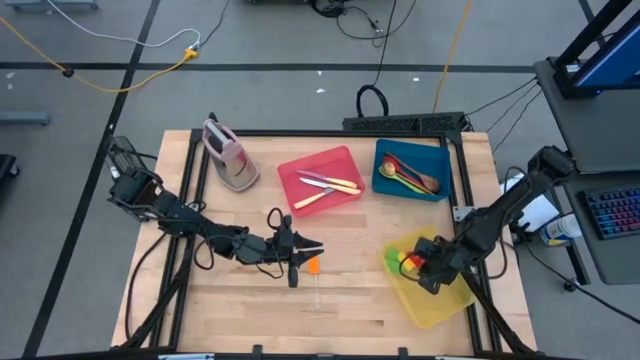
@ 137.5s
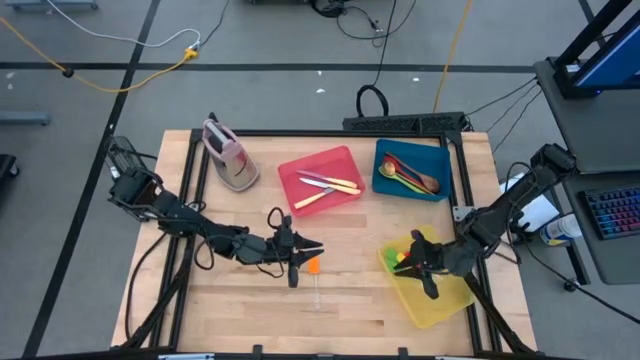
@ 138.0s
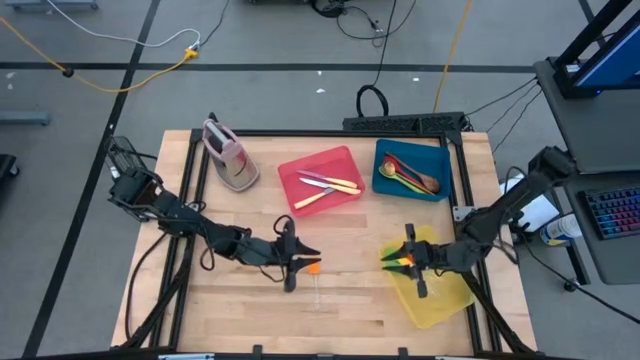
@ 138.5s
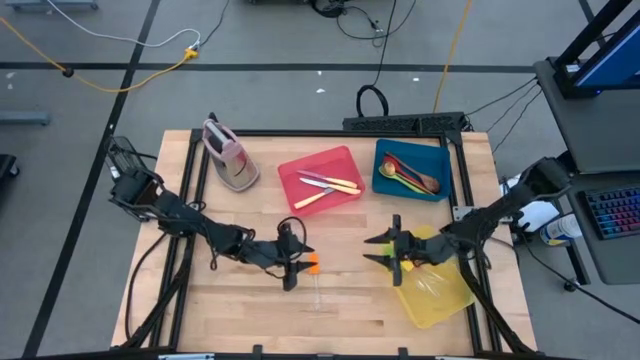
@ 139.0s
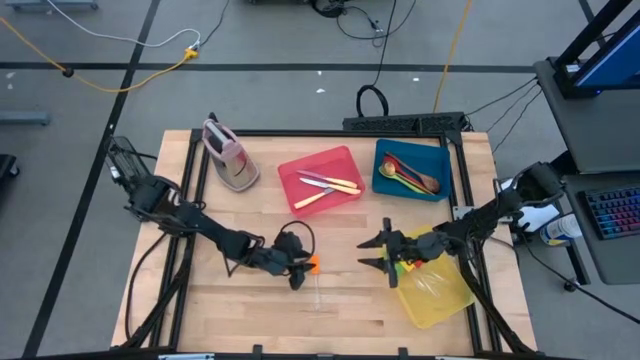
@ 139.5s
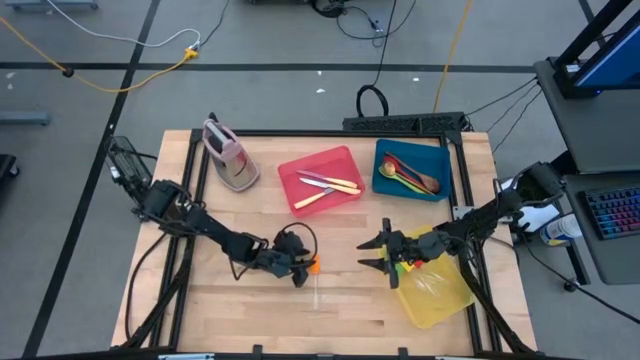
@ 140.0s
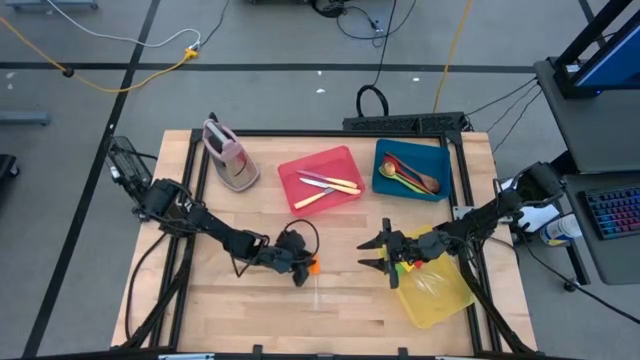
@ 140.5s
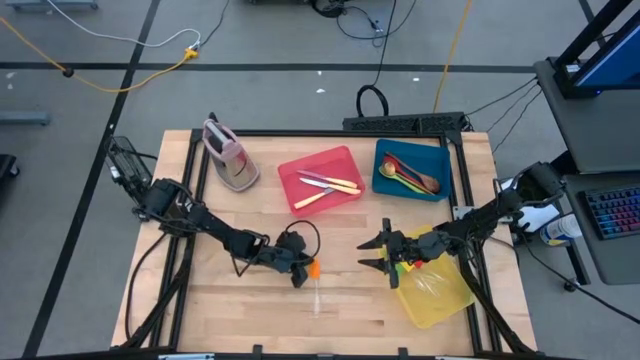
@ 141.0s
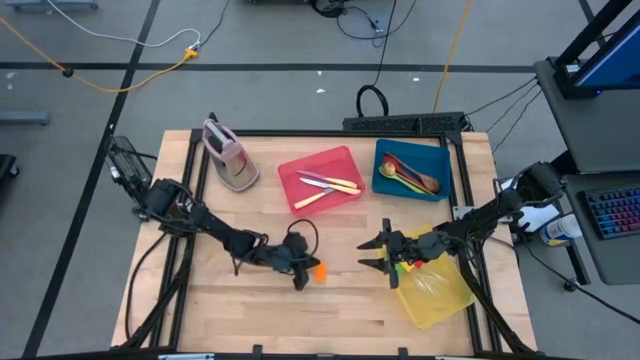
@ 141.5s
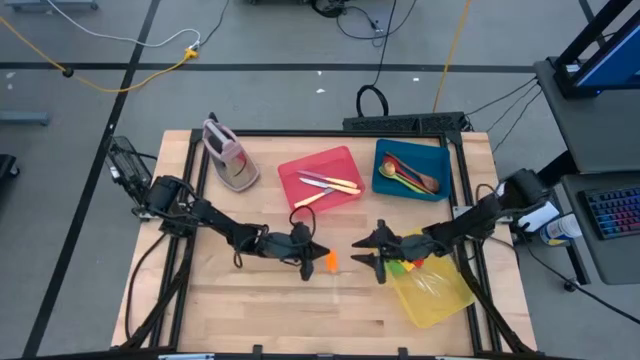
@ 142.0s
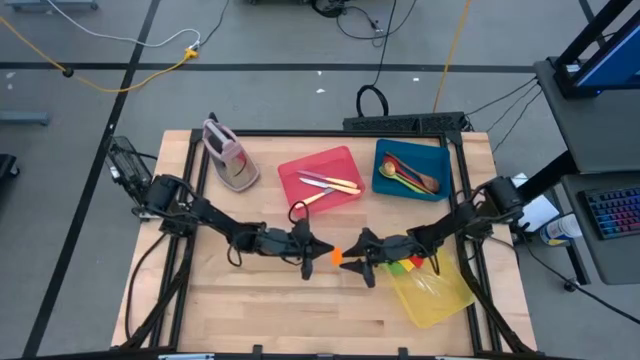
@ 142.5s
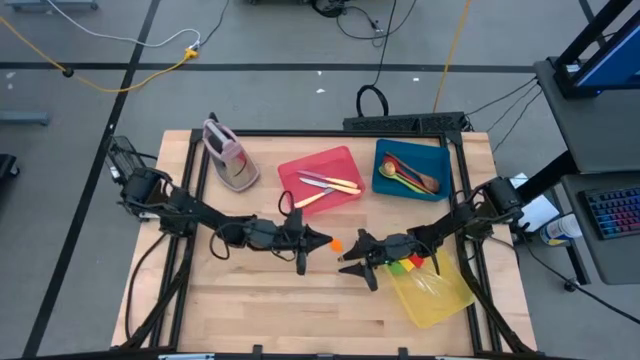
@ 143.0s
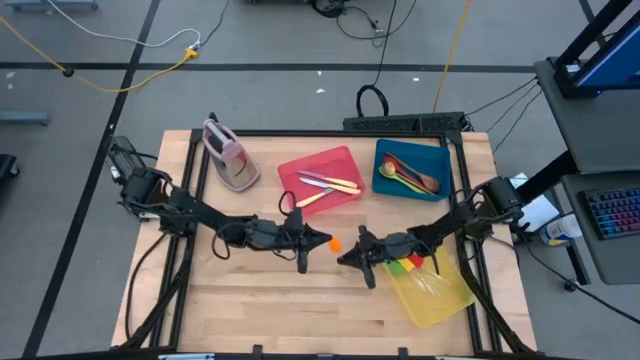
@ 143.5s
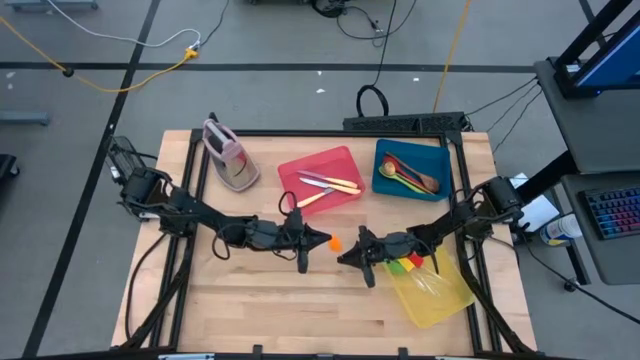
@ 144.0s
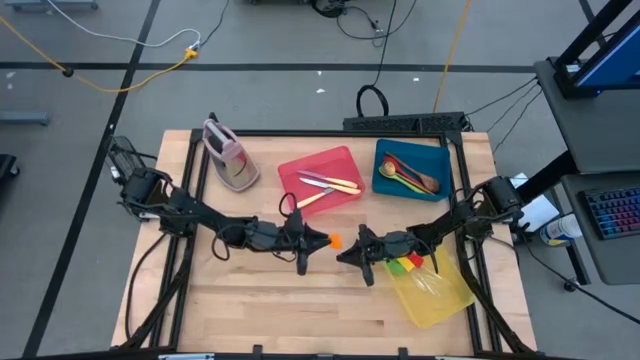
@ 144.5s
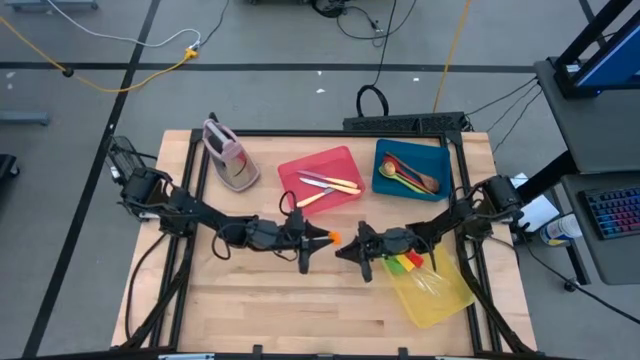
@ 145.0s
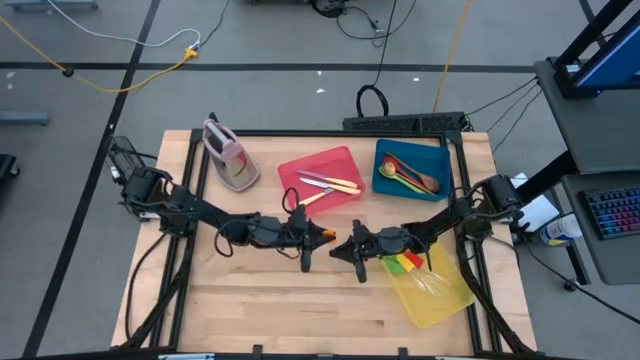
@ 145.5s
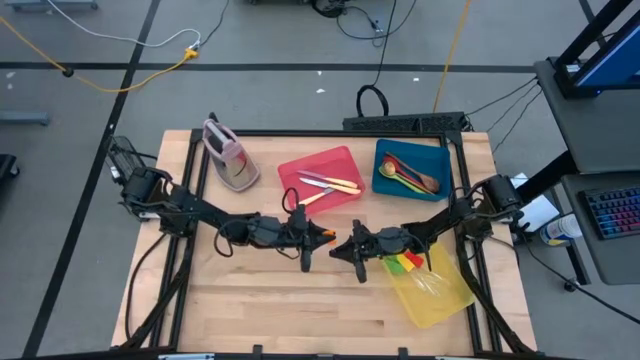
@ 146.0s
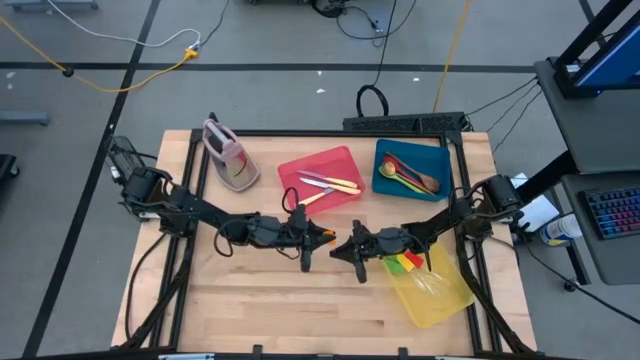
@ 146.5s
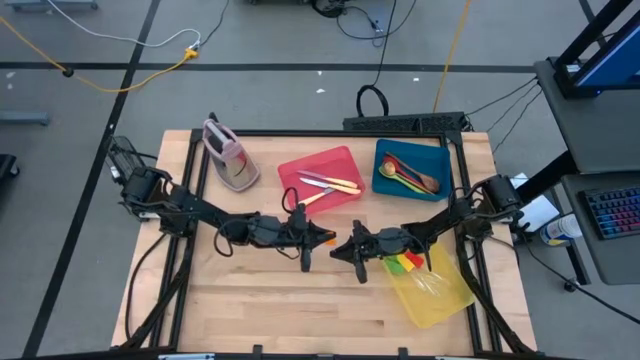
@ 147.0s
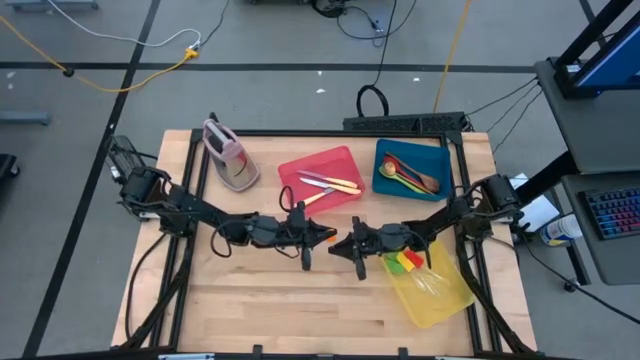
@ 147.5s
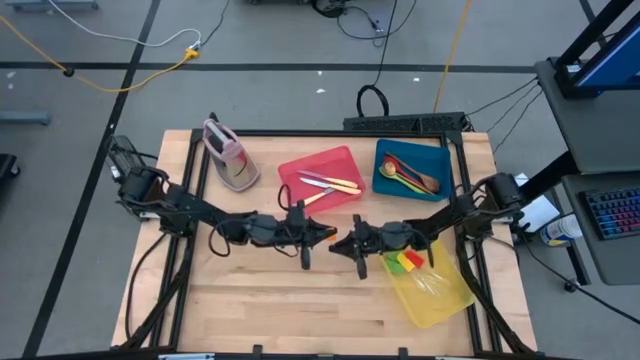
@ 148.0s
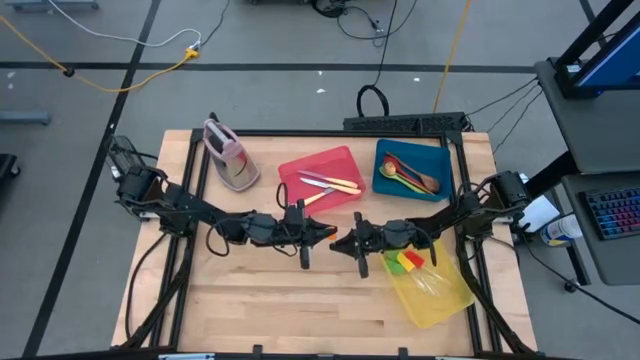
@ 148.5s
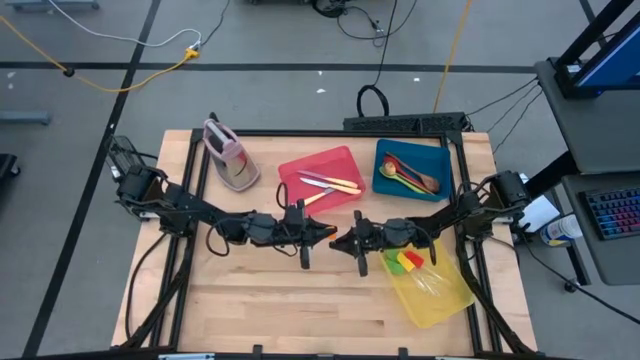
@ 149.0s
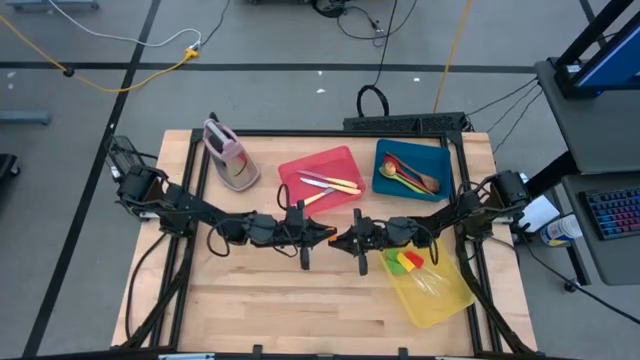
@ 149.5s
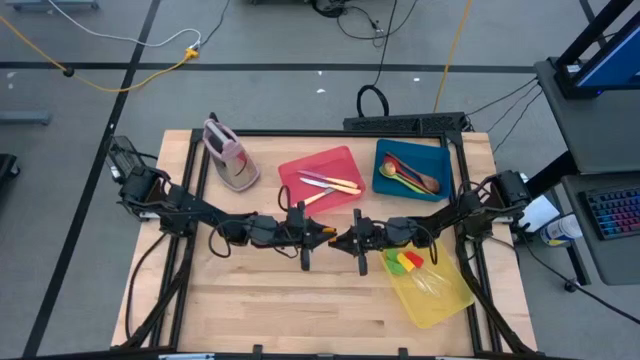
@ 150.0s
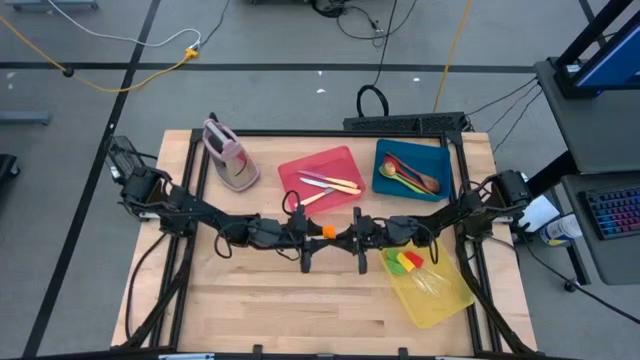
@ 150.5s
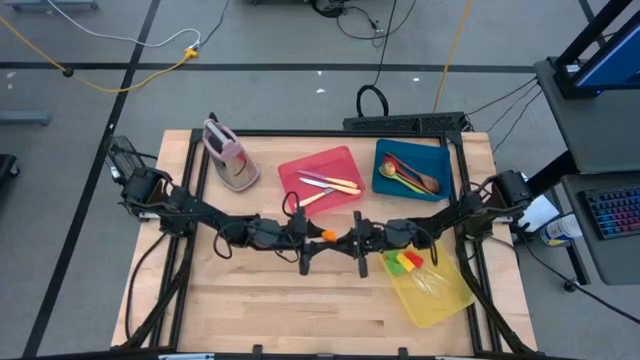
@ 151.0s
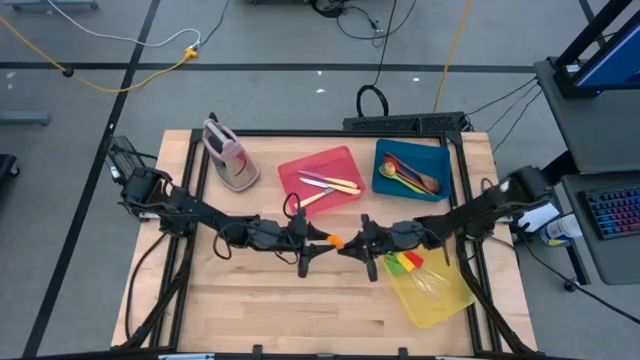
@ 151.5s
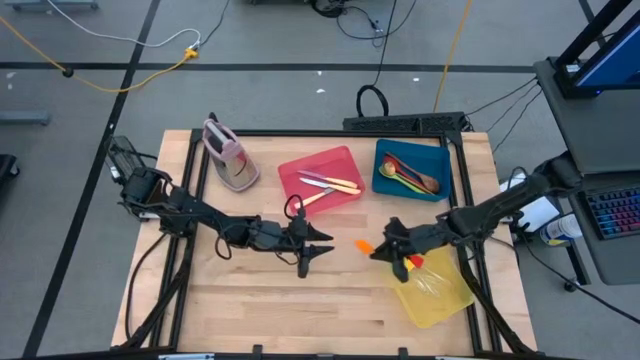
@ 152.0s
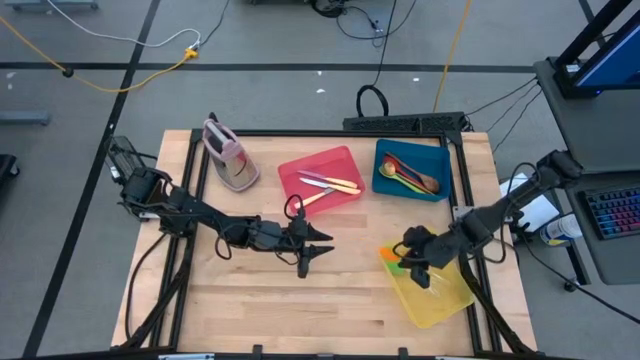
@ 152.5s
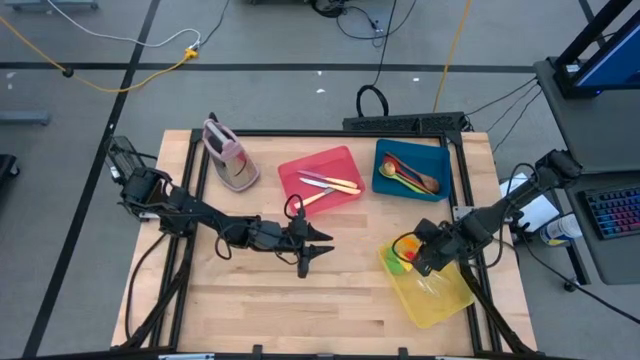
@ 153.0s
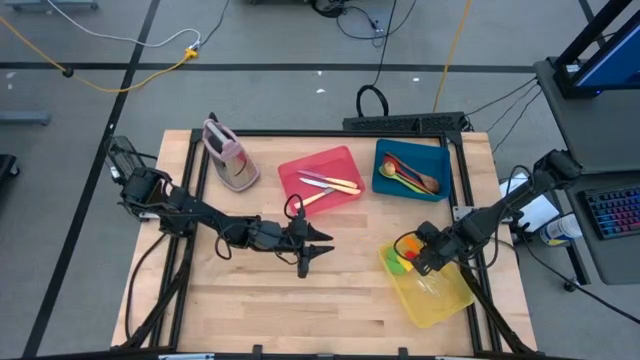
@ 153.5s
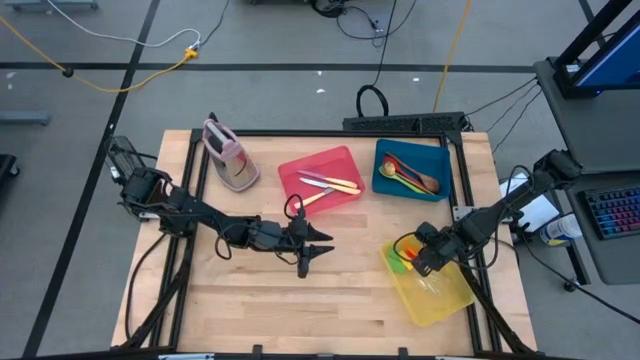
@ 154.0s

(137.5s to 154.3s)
Task: Pick & Place Kitchen Items
Put the orange spatula into the yellow bin

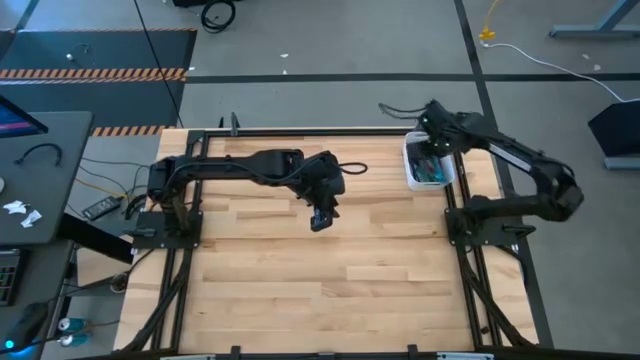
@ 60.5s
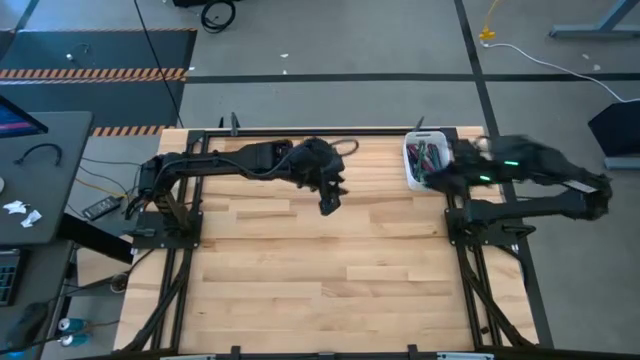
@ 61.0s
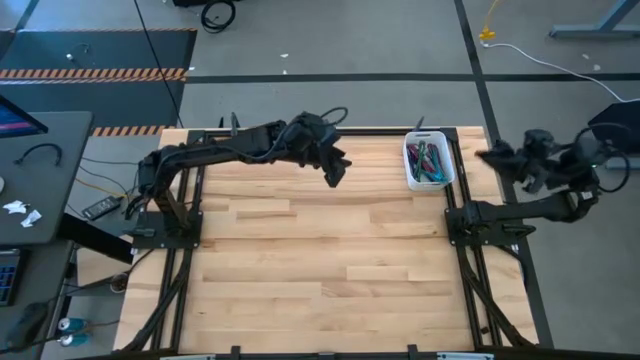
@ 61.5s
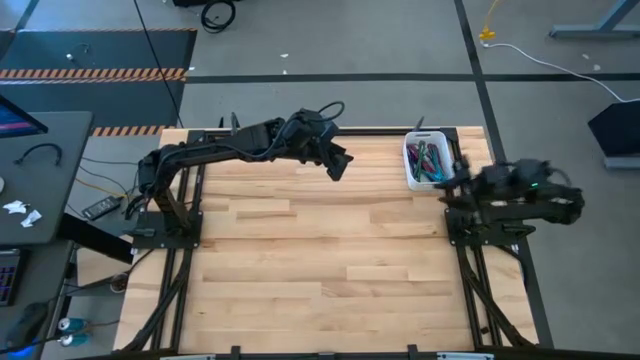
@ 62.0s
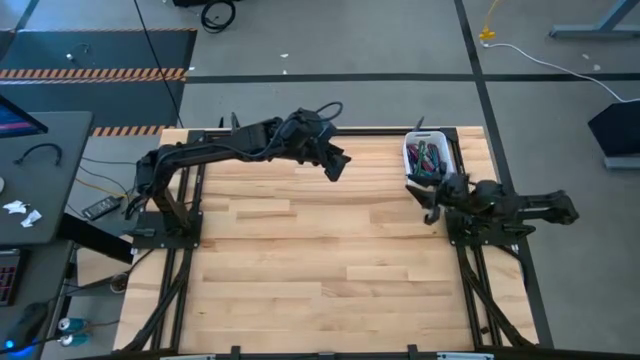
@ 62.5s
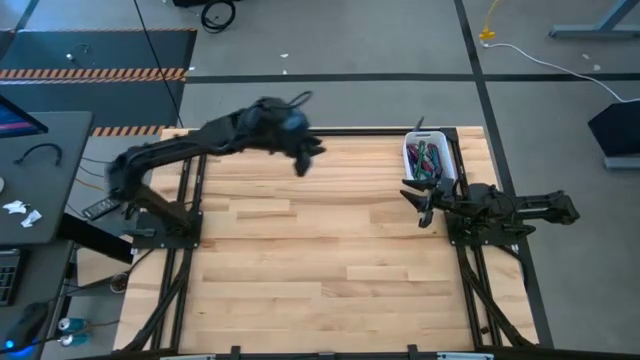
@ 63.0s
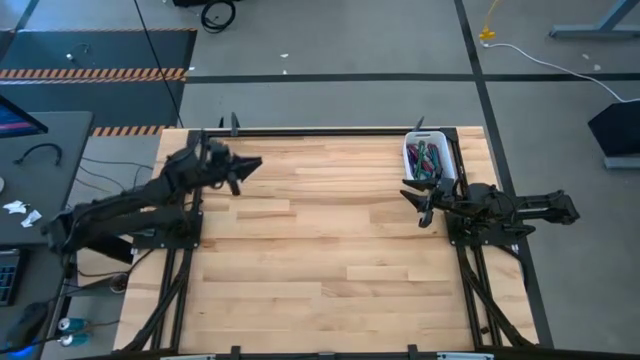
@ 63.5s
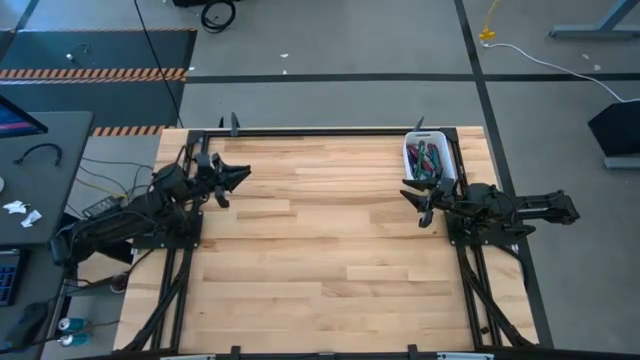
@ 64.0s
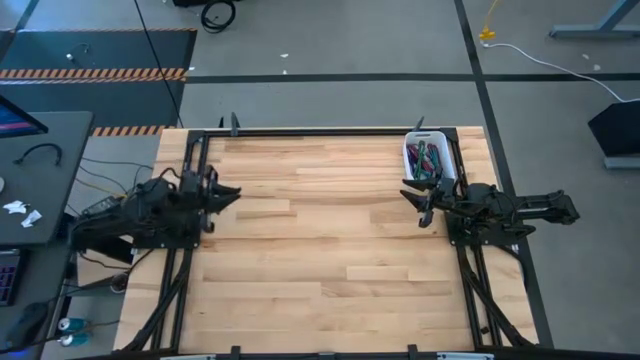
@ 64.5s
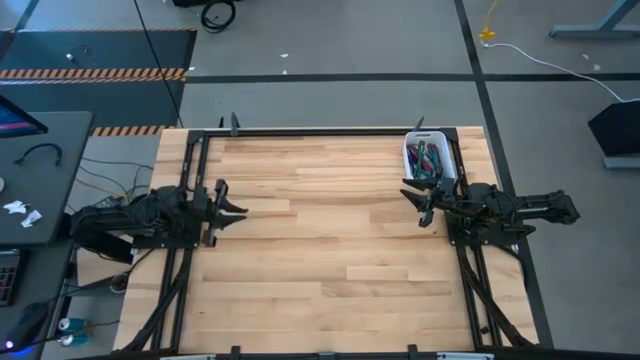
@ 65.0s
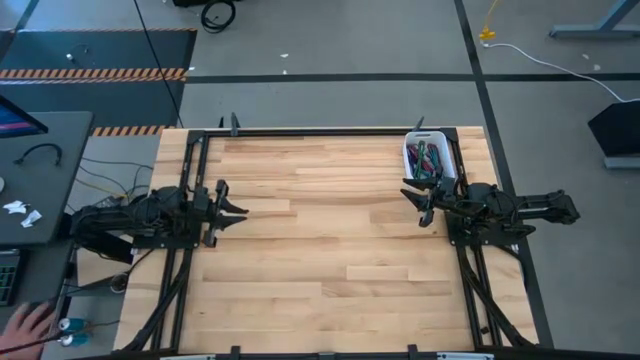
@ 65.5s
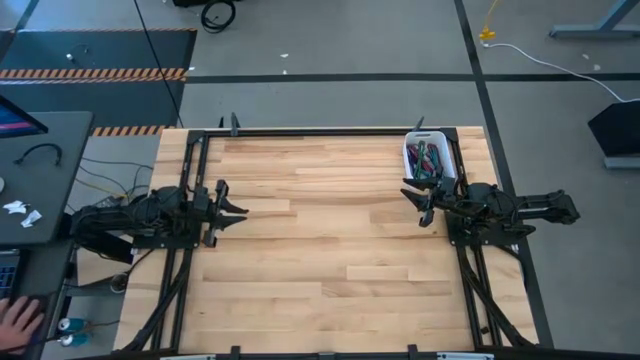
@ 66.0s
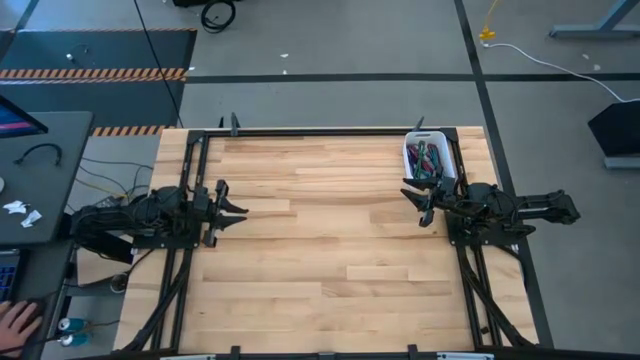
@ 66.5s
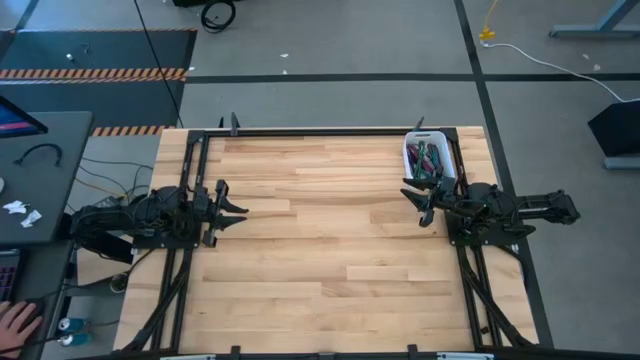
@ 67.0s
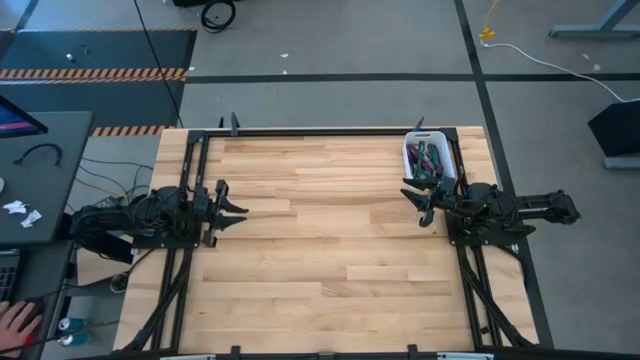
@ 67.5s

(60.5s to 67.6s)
Task: Pick and place USB-C Cables
Return to Home Position
